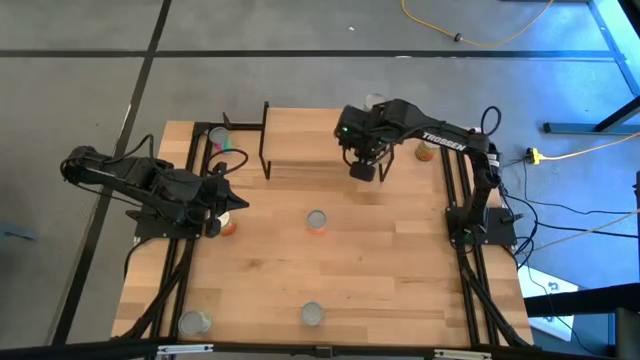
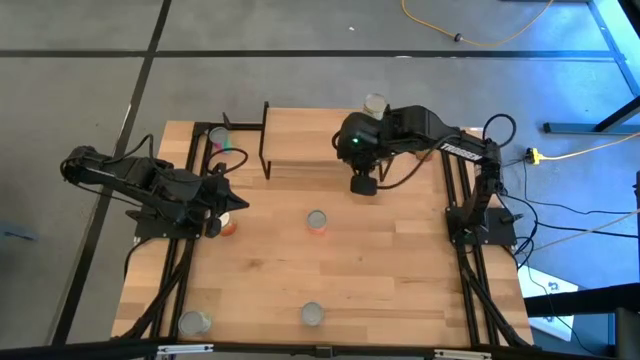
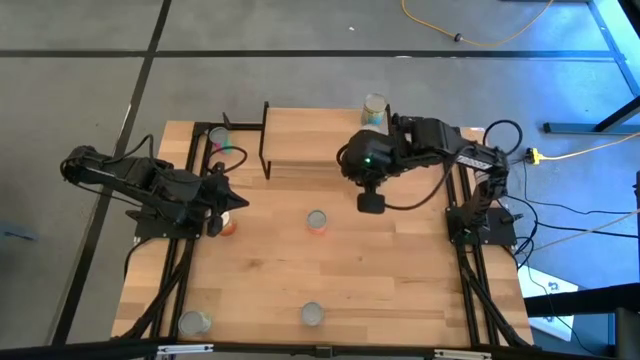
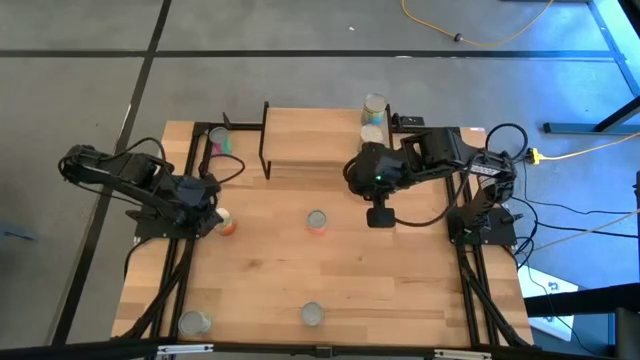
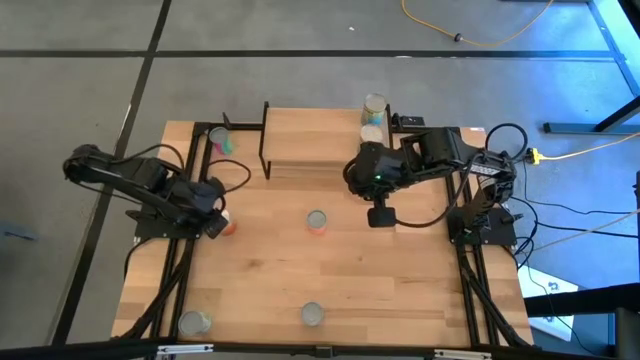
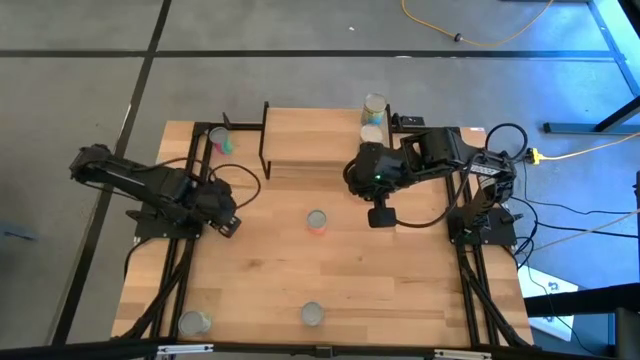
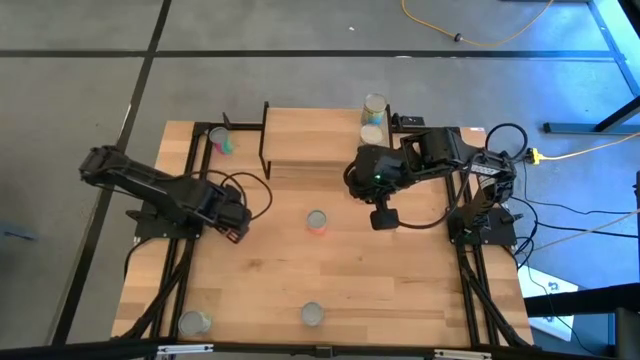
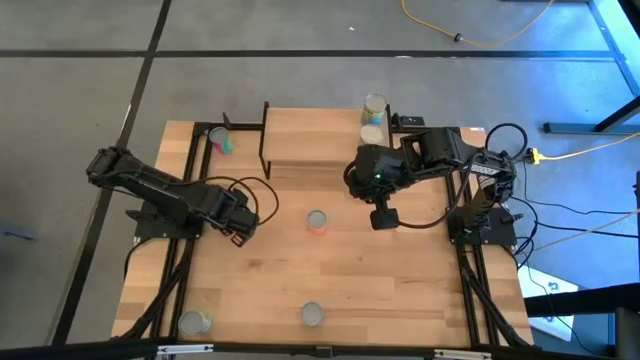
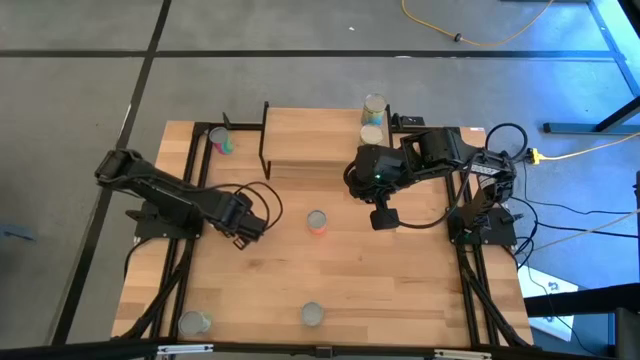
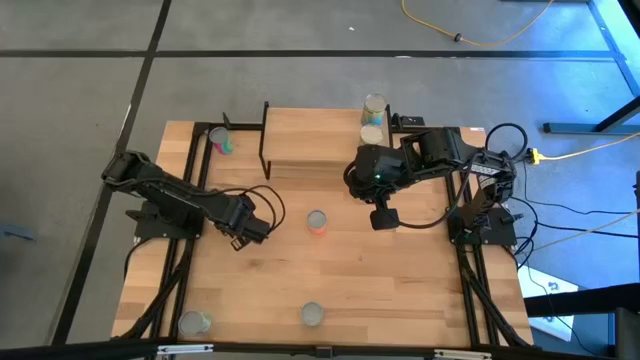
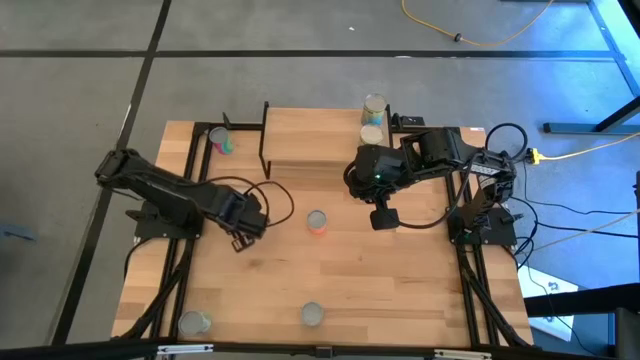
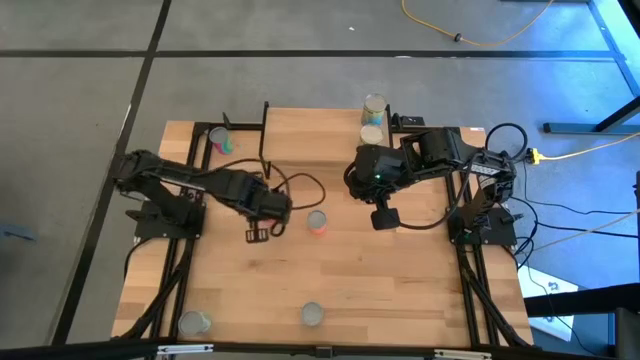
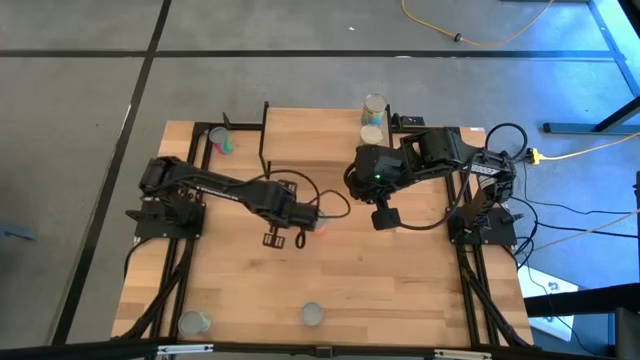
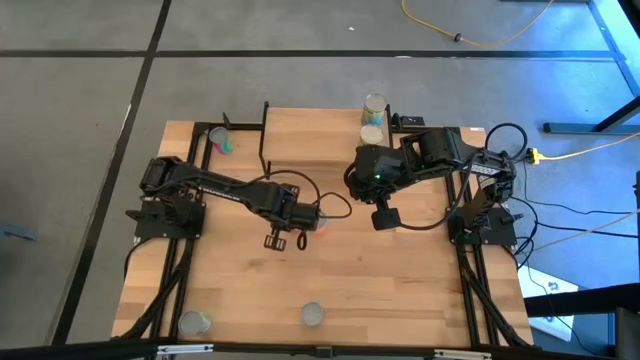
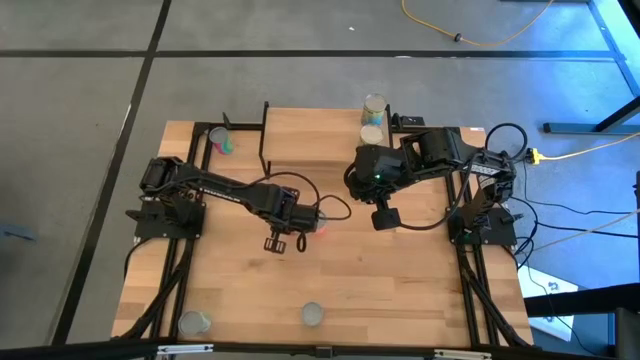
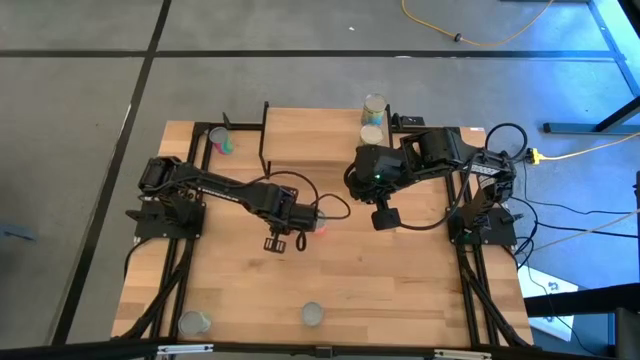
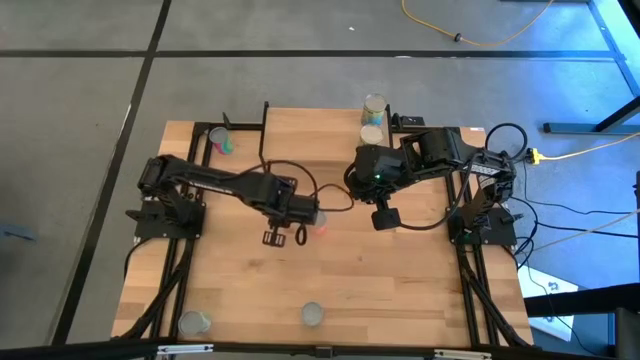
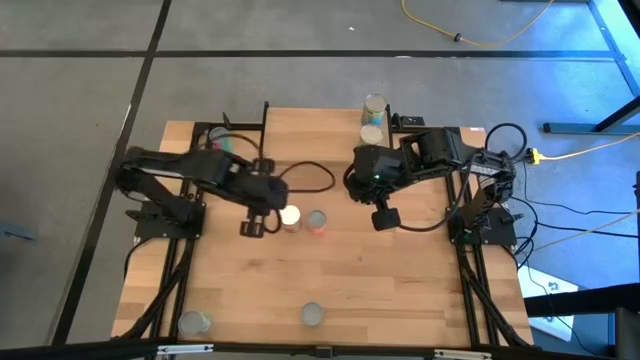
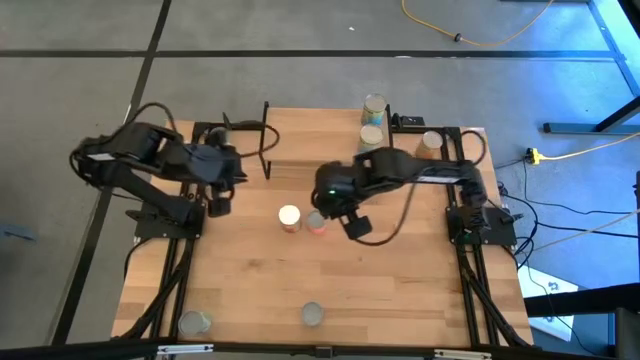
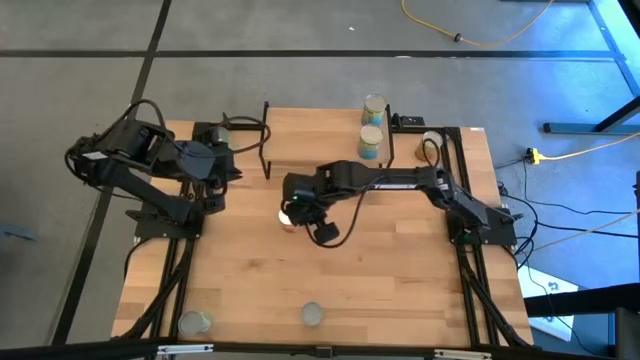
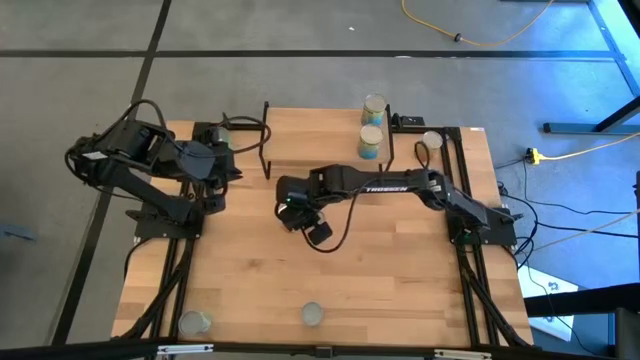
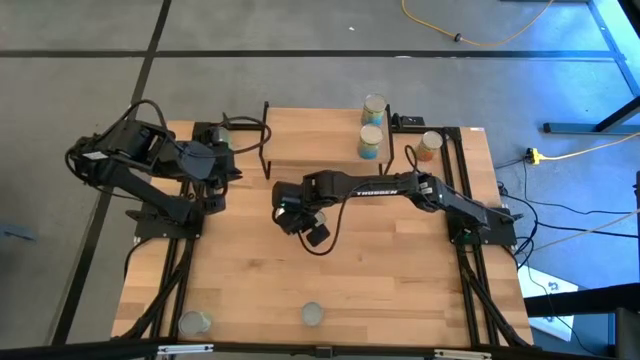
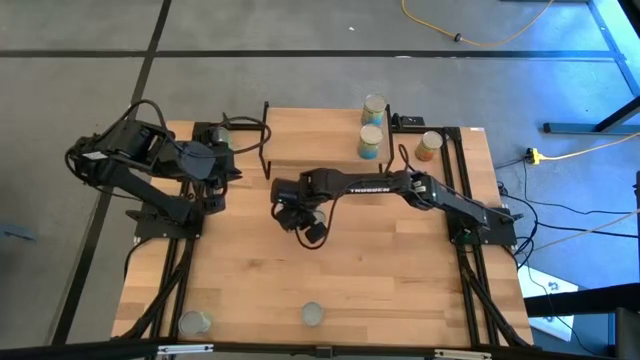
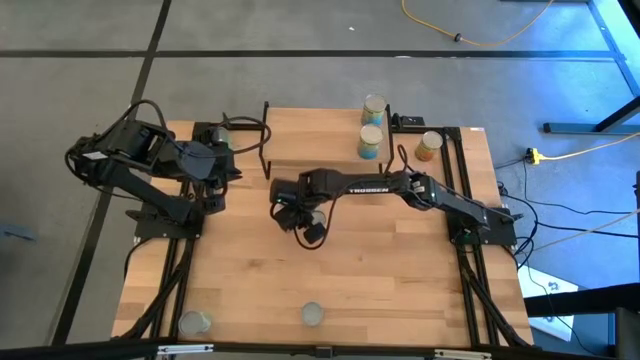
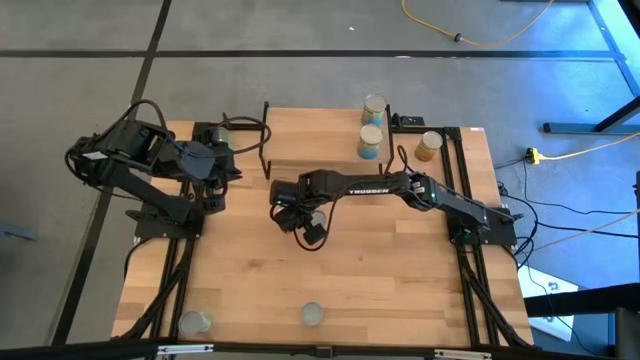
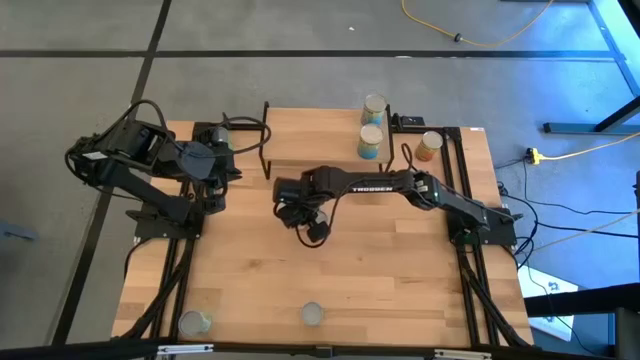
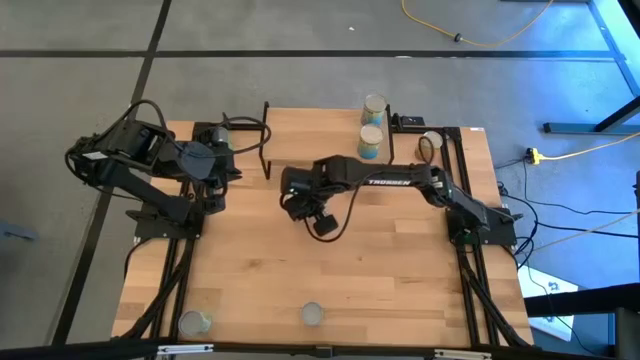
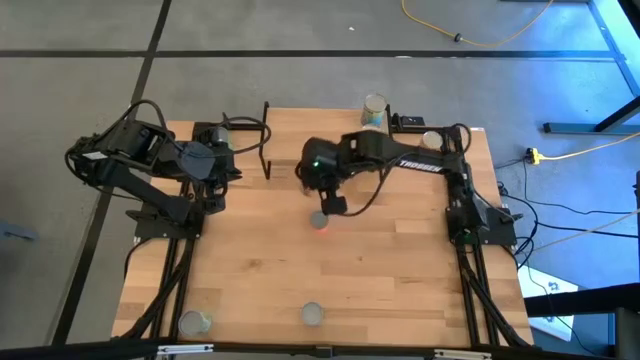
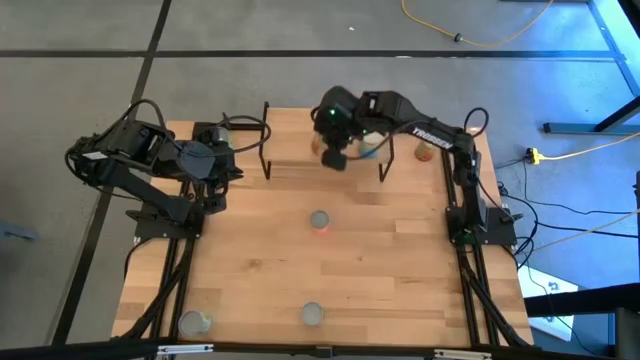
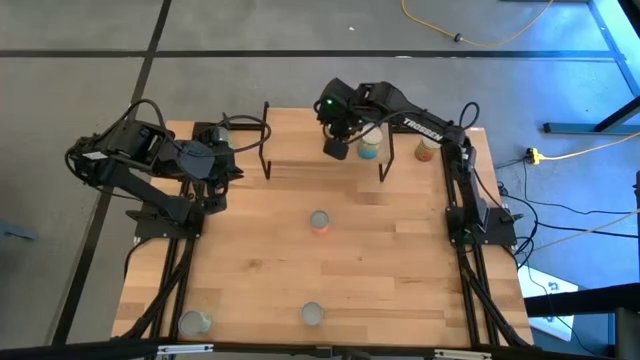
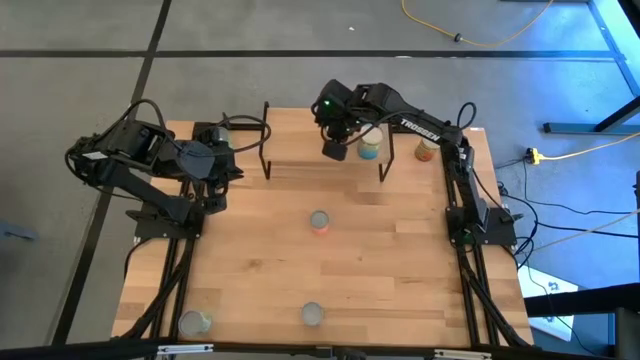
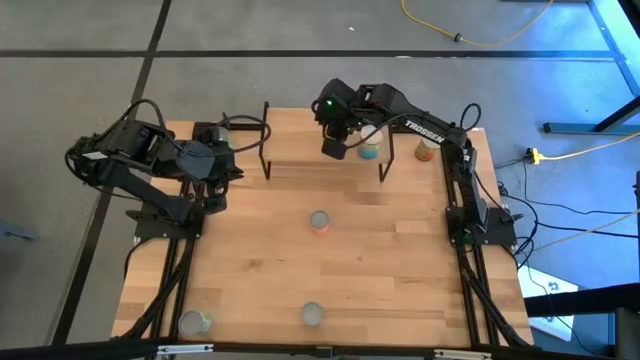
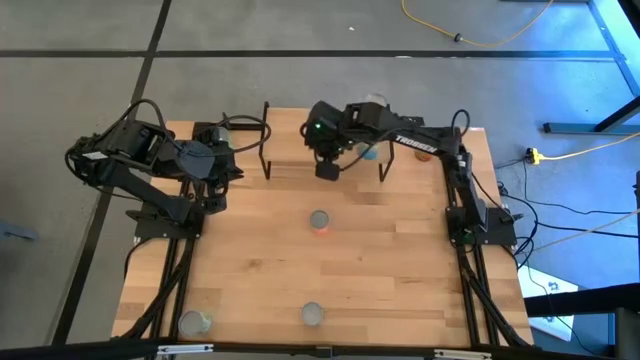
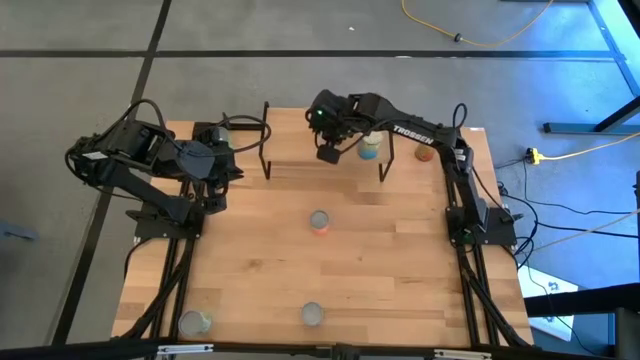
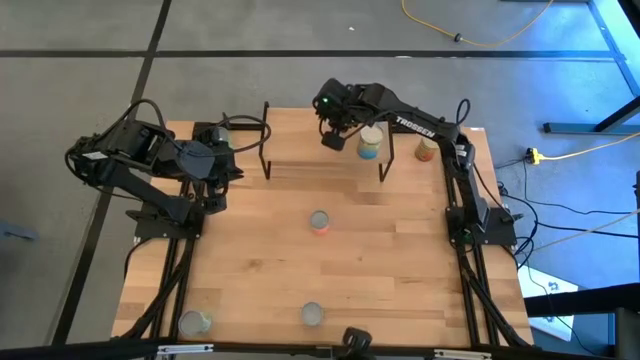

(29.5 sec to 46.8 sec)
Task: Pick and place cans onto a shelf
Put the canned pineapple on the shelf

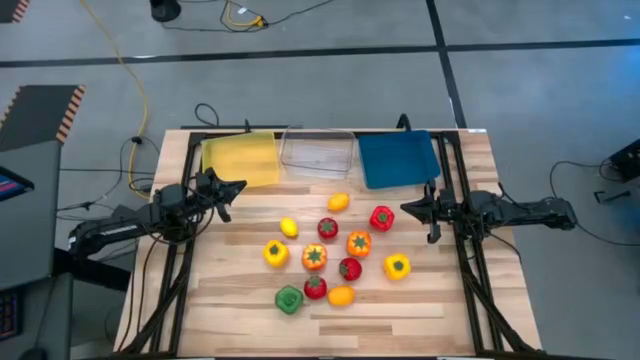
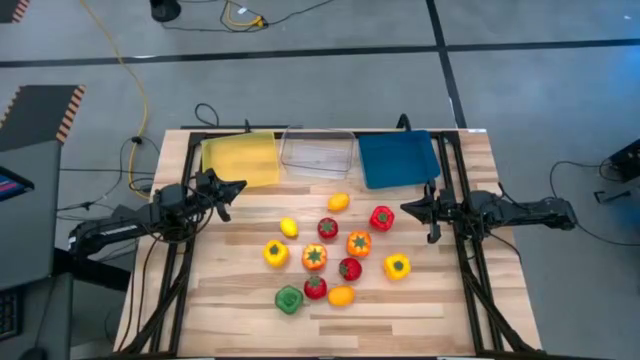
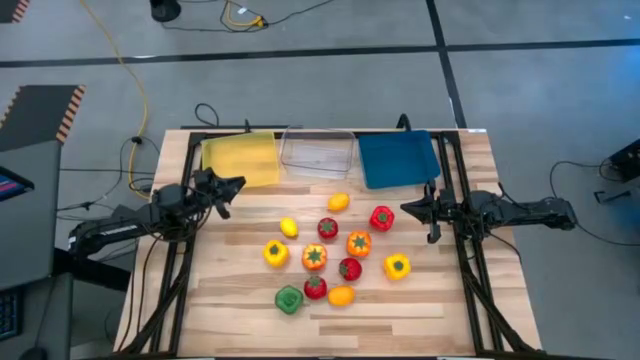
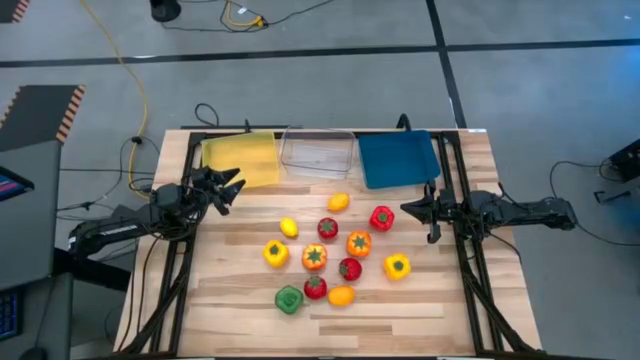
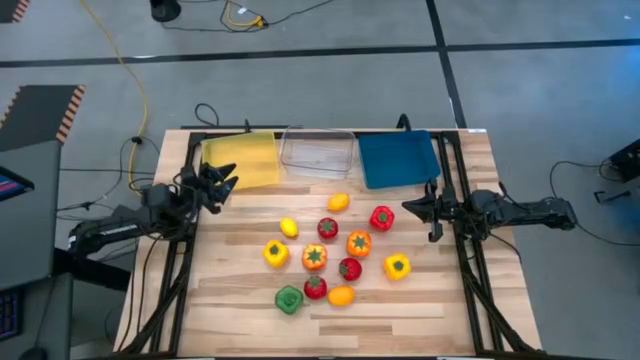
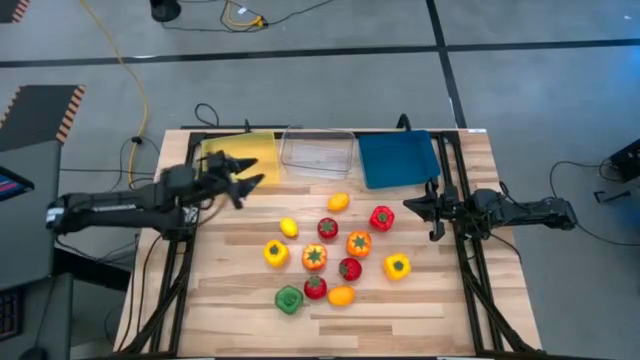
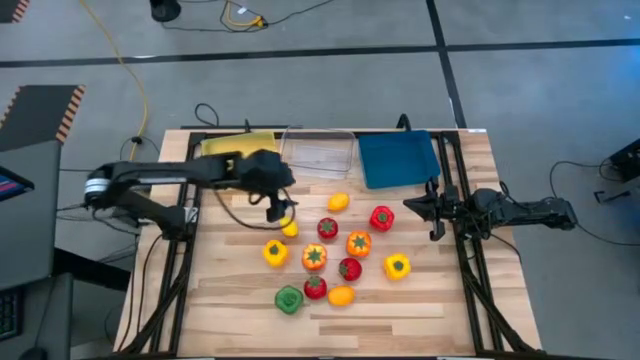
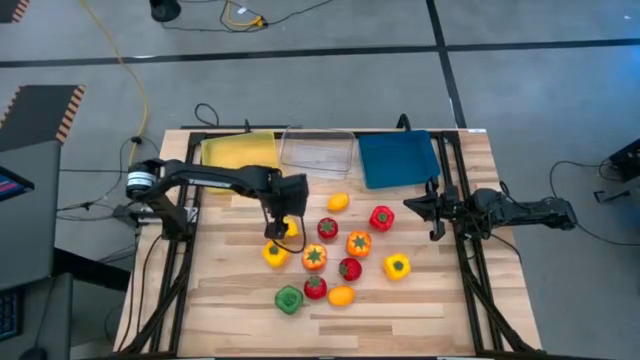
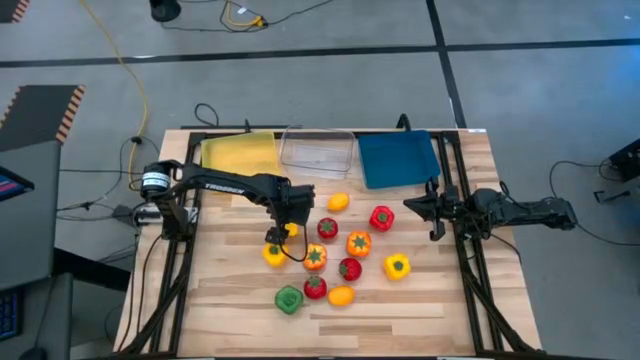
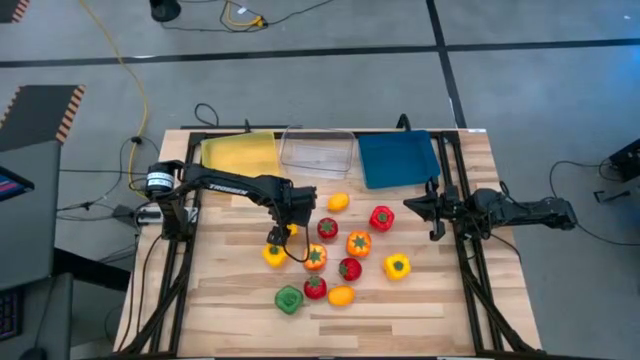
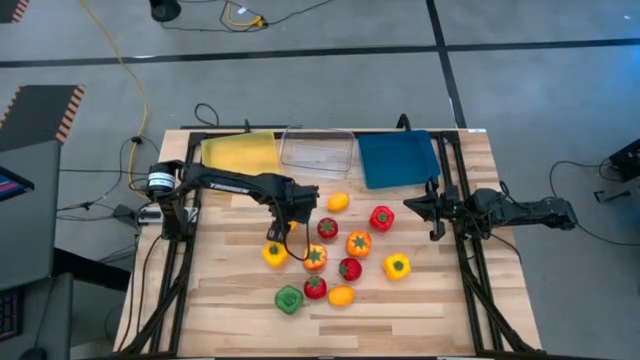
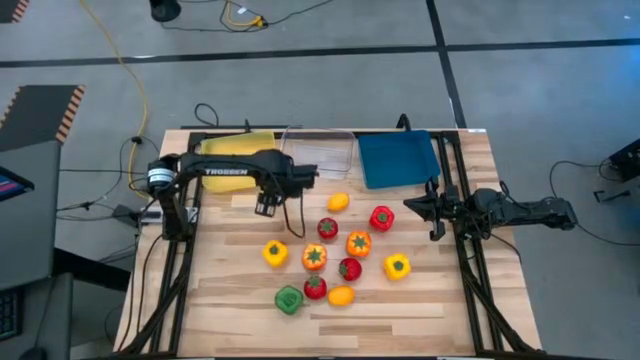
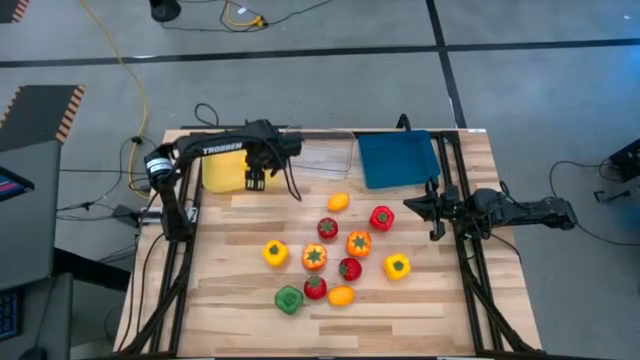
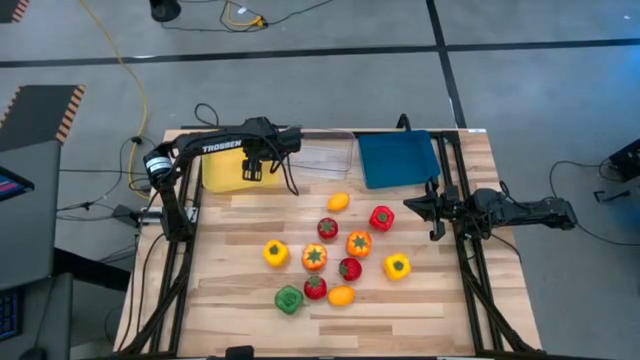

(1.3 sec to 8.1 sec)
Task: Sort produce into baskets
Put the middle left lemon into the yellow bin
